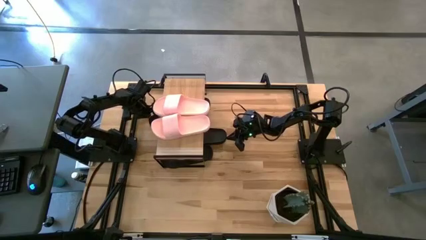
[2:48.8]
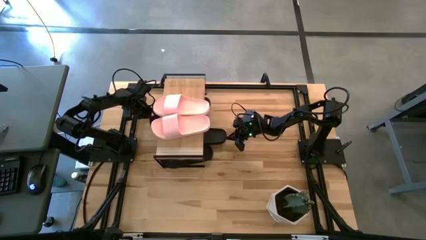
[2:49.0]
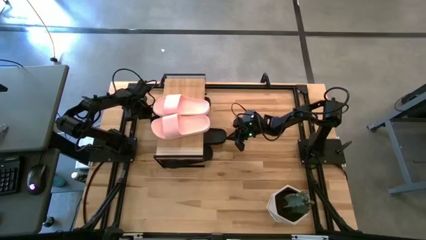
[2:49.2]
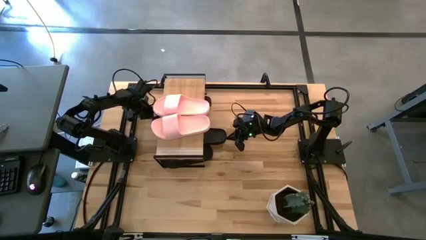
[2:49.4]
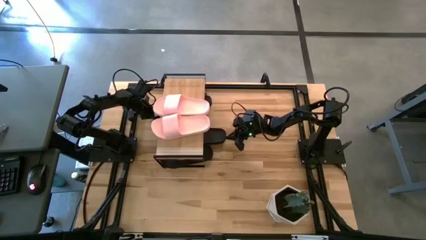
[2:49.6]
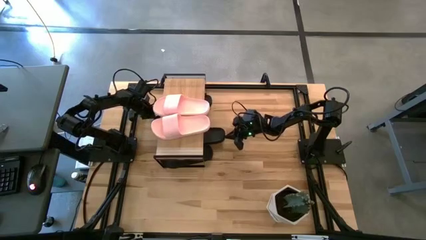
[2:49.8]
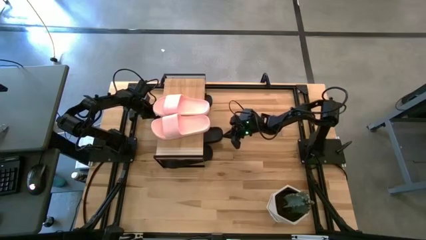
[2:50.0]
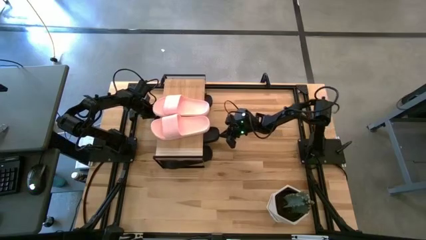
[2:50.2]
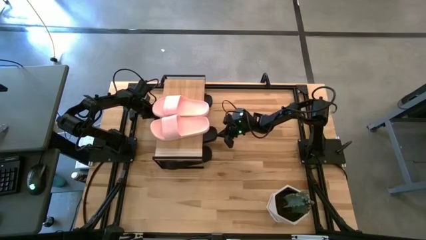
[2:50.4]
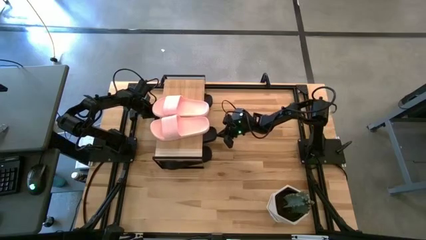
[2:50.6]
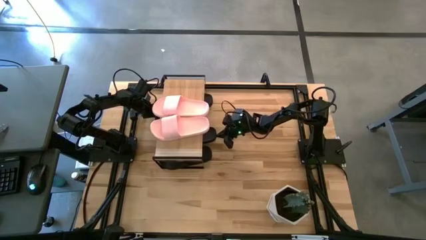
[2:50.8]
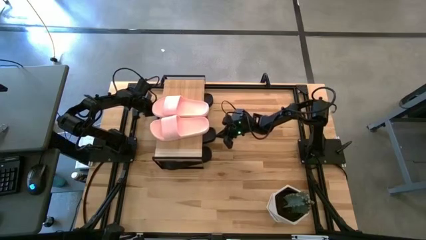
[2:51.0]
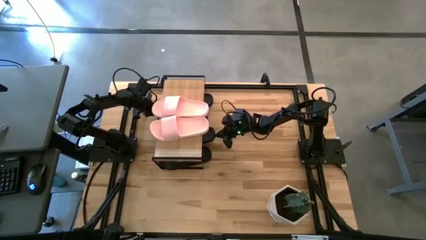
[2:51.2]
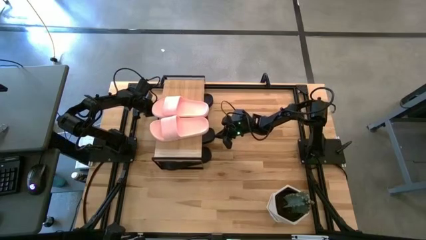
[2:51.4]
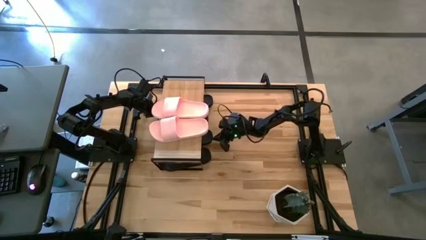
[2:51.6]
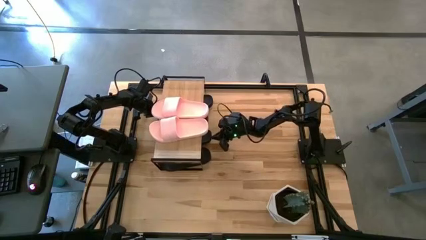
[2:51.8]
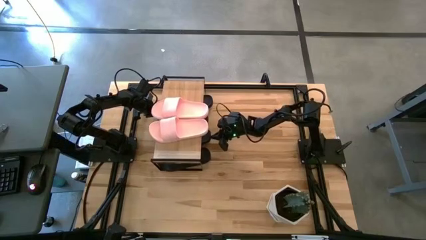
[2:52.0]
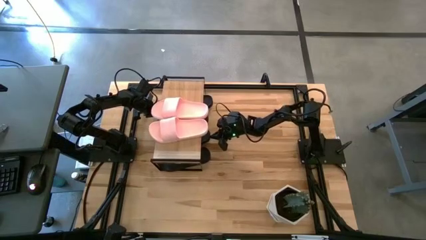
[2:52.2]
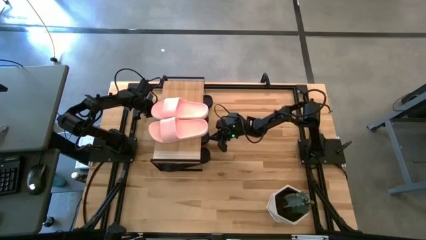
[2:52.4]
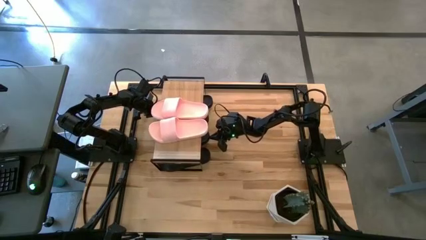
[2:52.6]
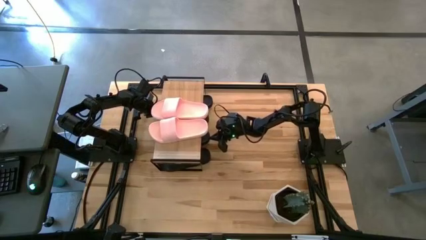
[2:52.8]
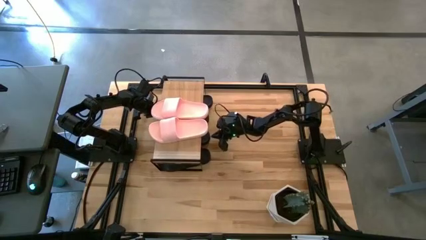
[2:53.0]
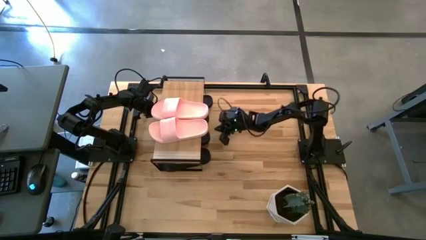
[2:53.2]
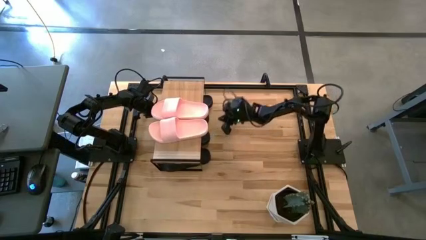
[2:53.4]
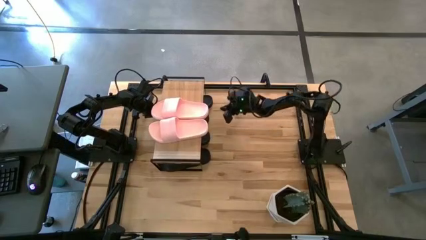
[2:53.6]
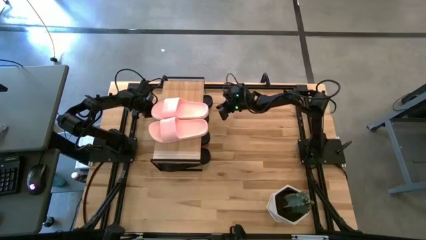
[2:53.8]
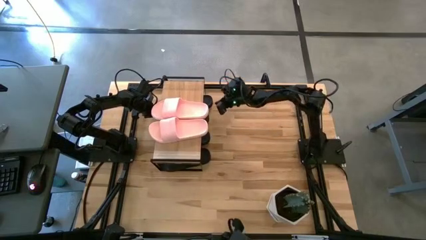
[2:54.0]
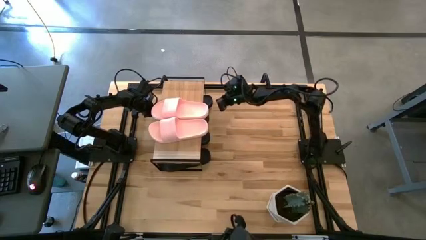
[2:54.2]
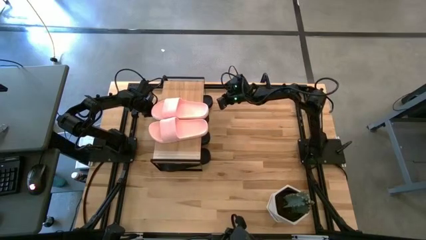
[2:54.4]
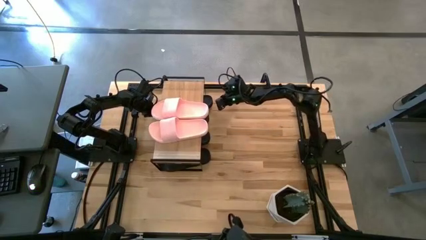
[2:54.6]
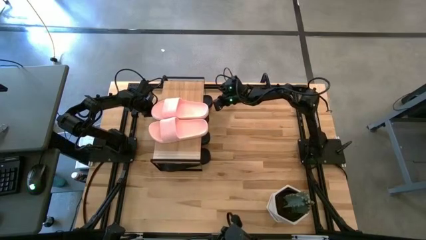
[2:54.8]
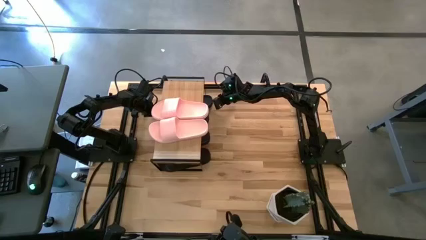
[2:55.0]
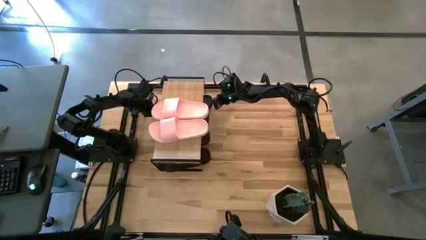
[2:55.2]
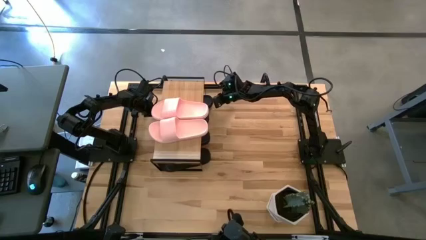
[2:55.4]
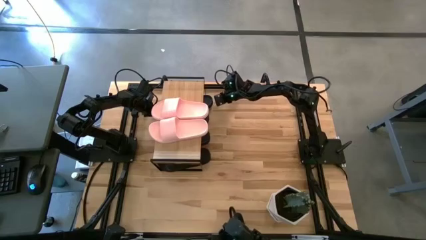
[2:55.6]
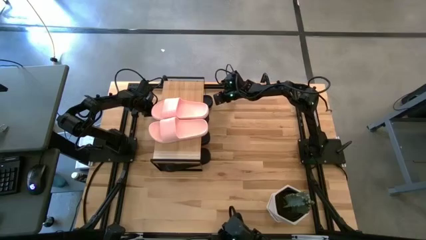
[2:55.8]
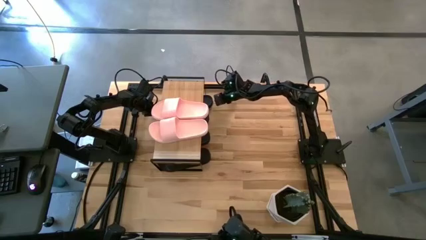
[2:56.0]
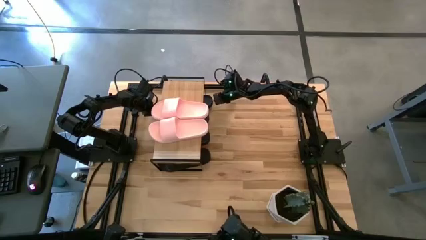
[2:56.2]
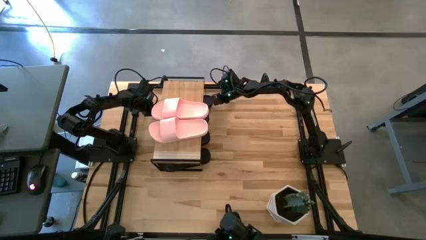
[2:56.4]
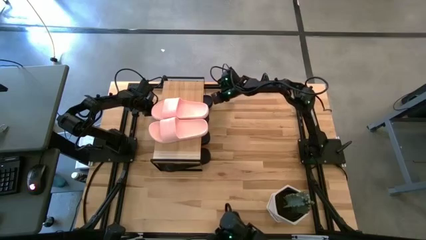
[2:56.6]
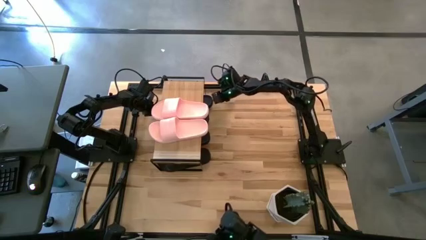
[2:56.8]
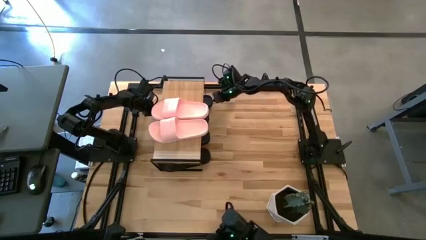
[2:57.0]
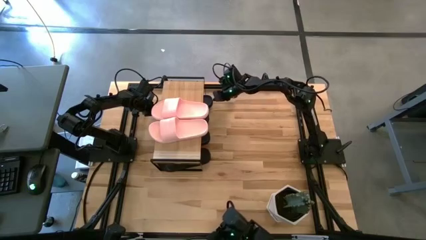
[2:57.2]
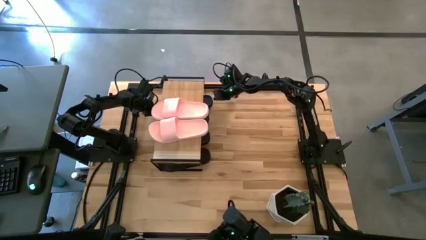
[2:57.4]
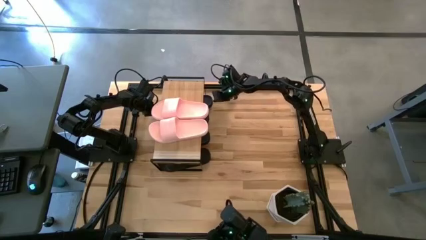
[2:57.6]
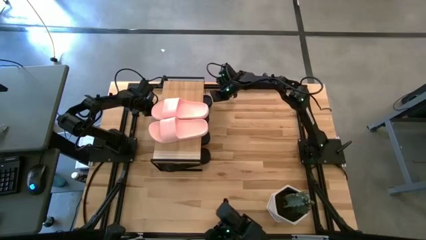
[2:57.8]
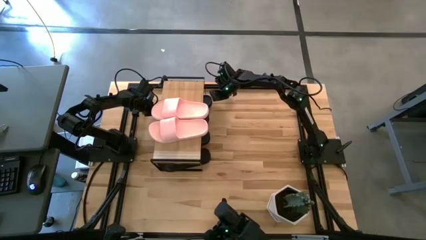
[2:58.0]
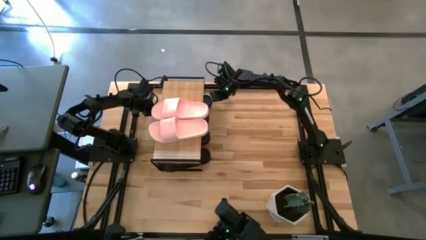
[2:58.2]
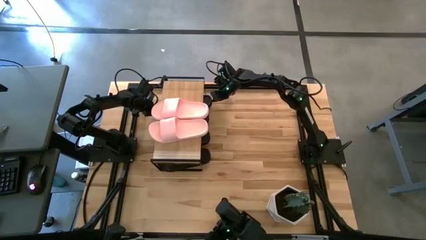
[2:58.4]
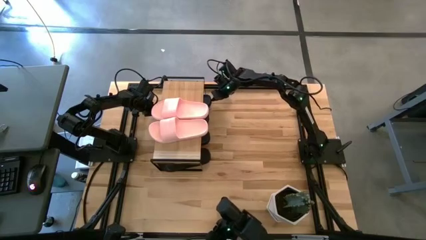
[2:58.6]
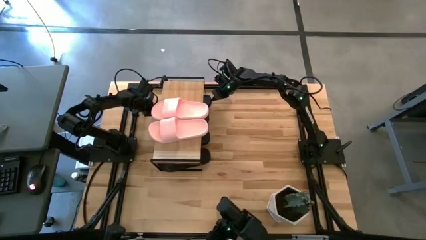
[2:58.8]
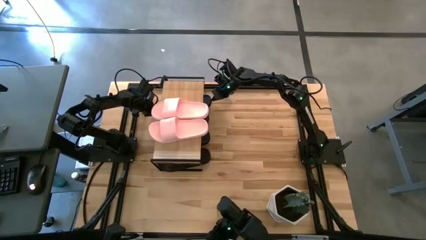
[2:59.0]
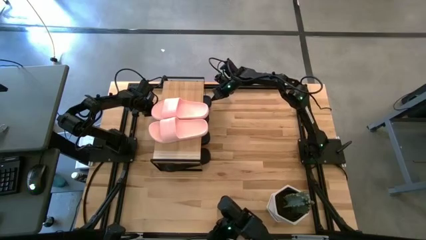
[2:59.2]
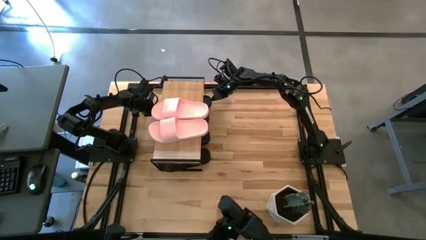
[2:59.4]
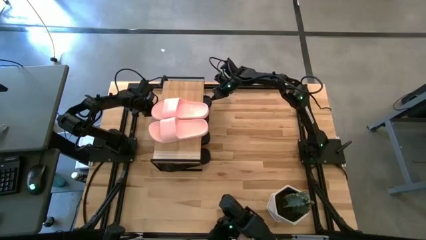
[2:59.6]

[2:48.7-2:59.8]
Task: Pick and place slides into the shelf
Adjust the black slides under the shelf
